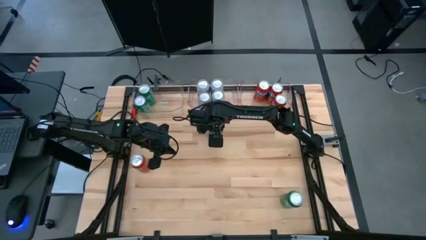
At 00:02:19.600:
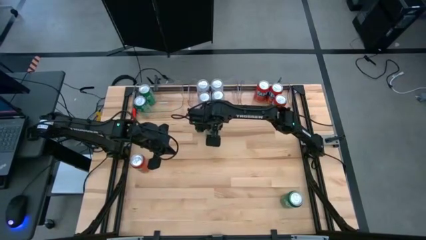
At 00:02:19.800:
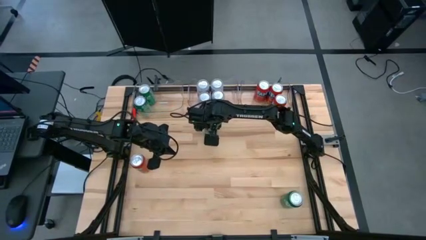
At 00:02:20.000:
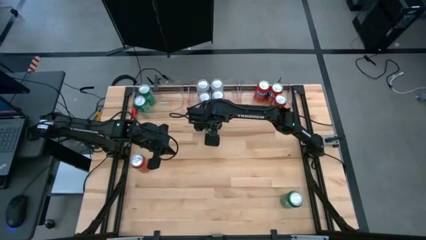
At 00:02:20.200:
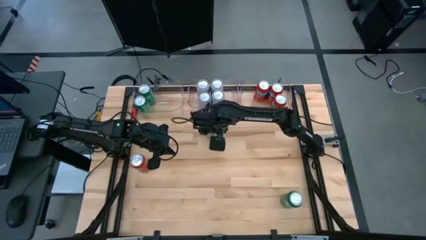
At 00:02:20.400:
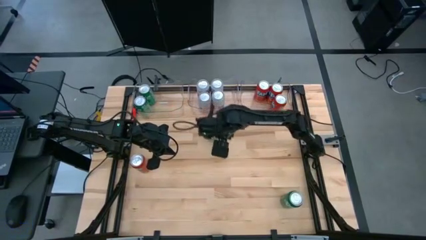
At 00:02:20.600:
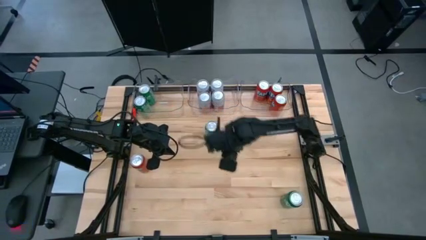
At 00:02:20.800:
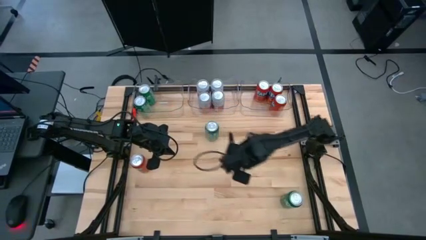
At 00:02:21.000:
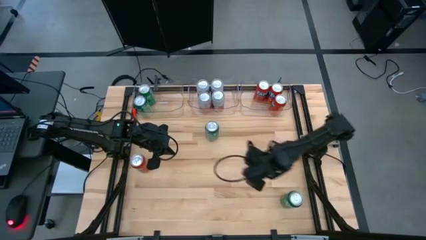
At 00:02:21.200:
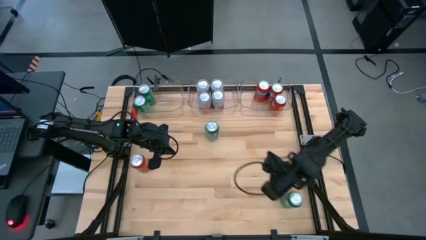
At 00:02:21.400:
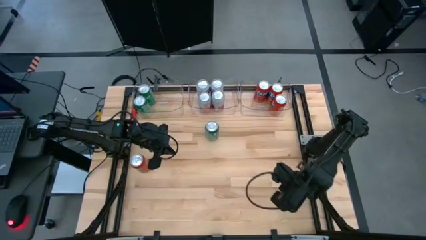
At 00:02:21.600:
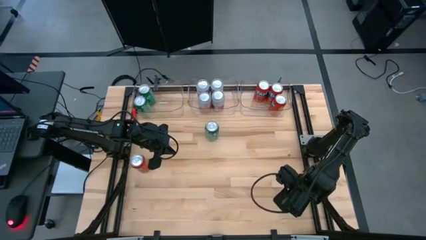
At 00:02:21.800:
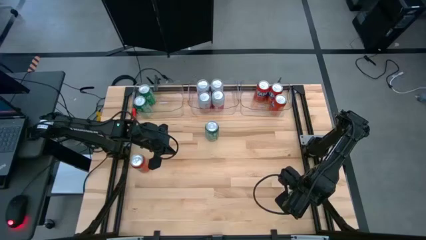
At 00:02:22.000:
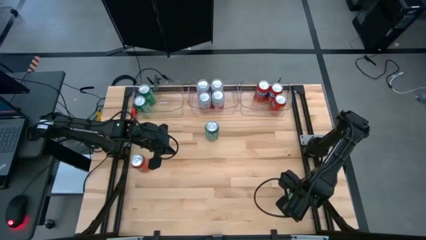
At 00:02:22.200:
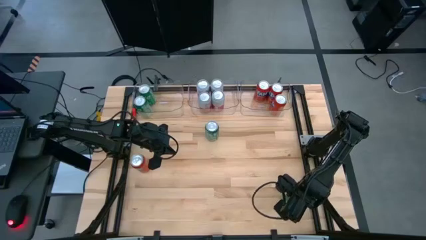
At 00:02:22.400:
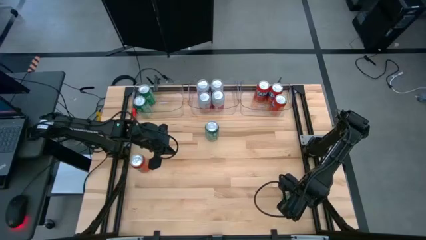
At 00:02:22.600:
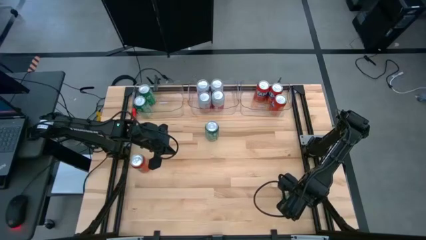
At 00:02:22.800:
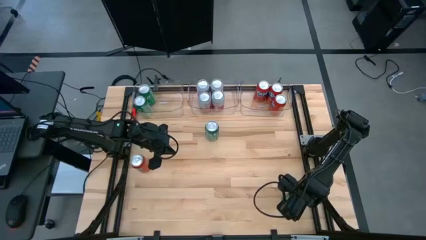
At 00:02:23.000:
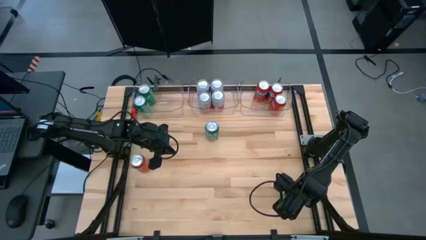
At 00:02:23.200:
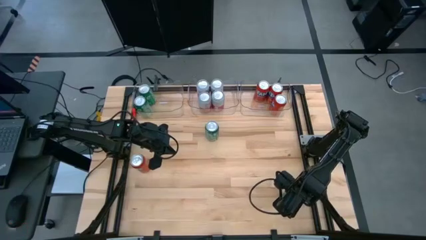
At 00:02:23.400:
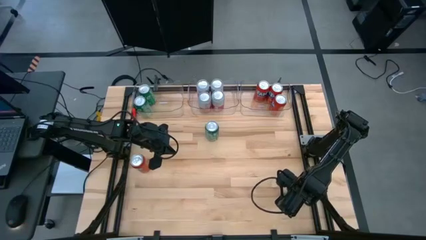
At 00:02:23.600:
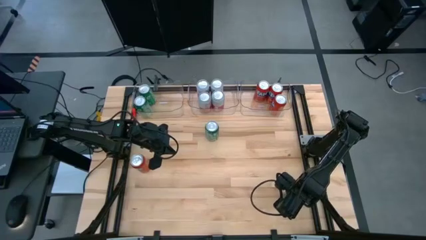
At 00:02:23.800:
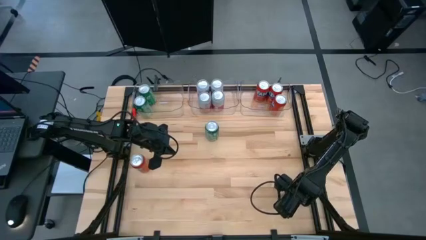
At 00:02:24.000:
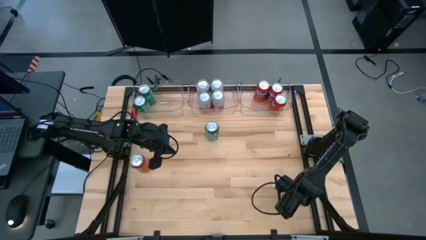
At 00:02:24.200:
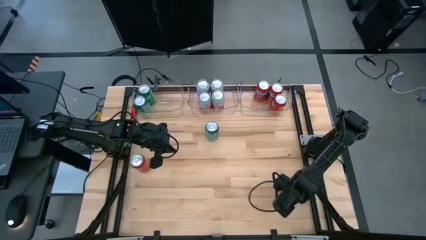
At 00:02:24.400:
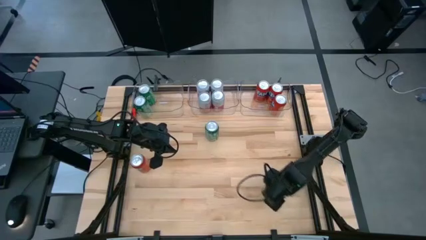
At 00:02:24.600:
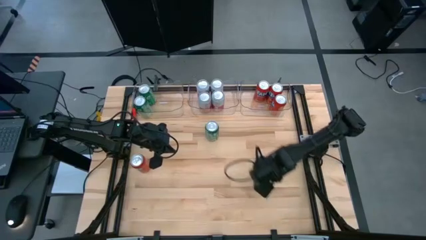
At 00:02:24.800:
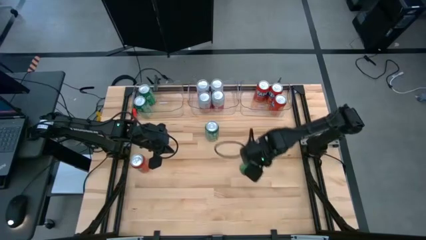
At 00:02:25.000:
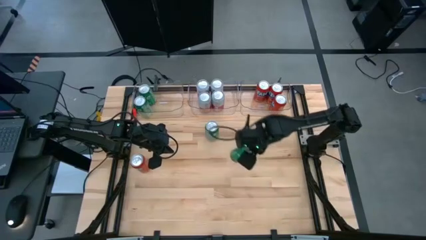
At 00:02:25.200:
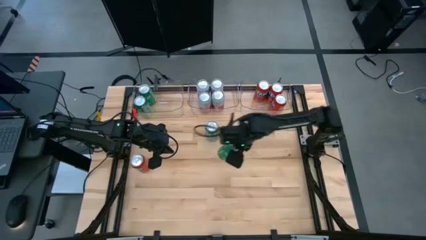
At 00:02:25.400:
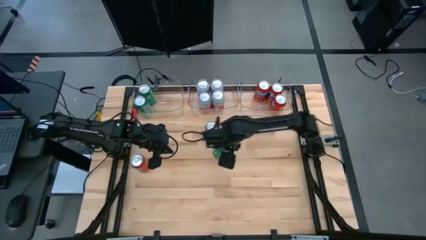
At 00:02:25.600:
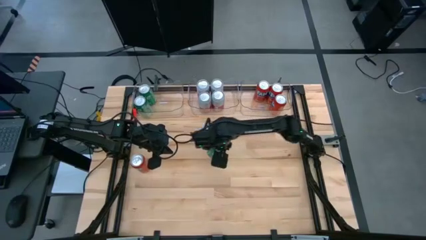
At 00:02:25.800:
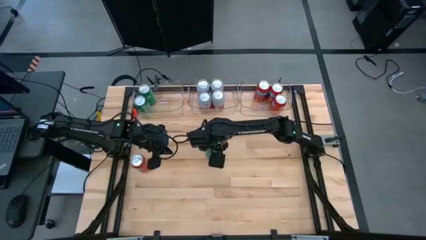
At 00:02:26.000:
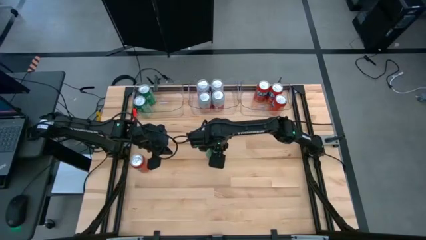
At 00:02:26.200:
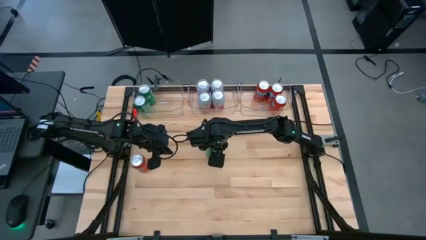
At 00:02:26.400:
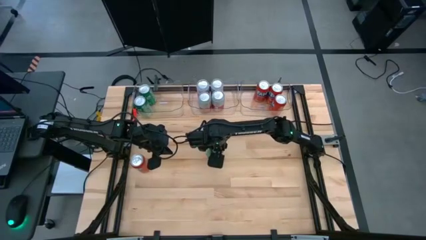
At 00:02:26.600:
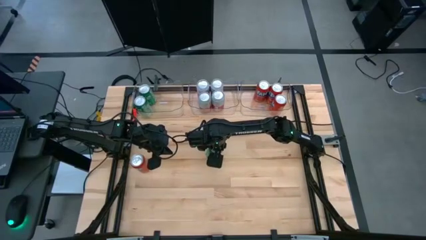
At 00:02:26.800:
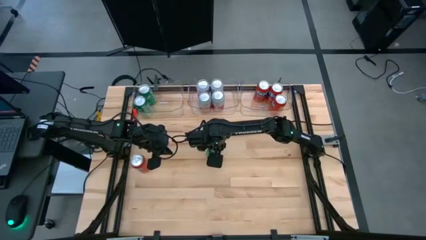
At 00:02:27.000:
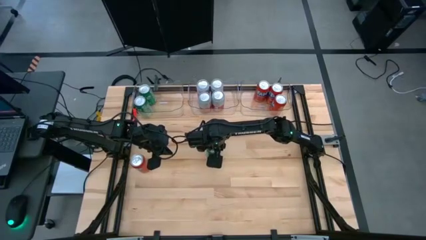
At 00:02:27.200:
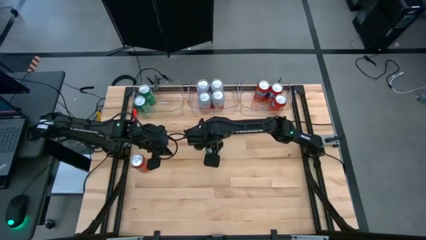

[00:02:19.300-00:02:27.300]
Task: Sort soda cans
Move the green soda can to the top center of the table

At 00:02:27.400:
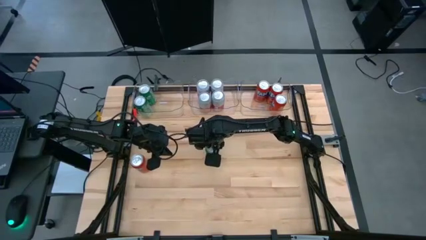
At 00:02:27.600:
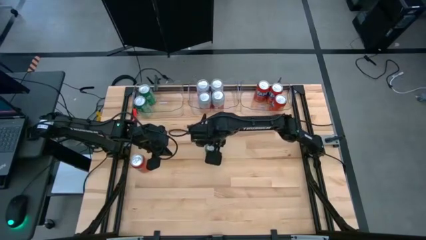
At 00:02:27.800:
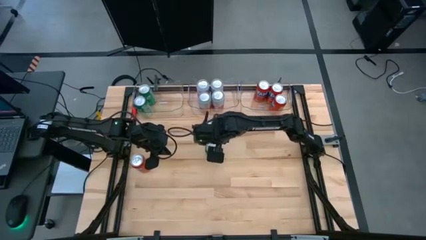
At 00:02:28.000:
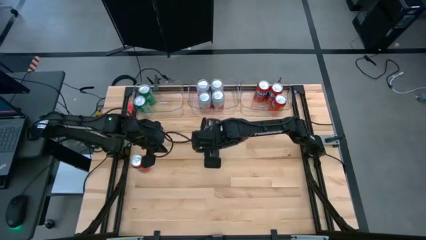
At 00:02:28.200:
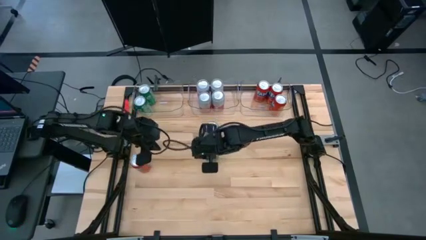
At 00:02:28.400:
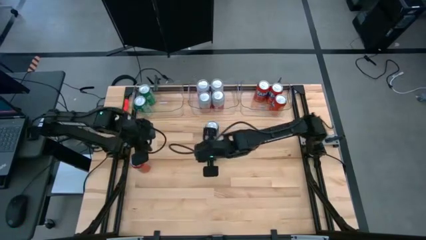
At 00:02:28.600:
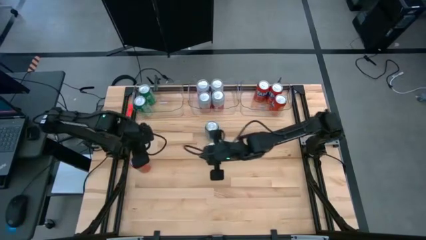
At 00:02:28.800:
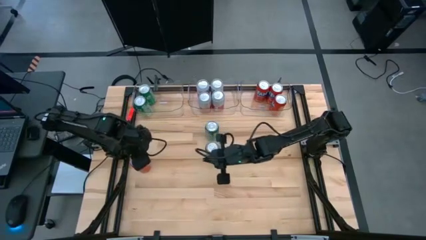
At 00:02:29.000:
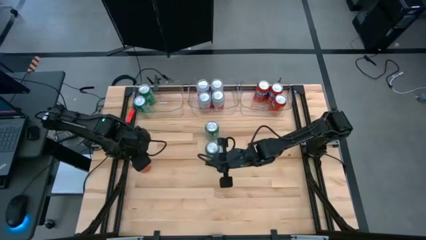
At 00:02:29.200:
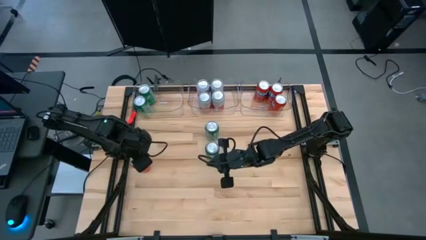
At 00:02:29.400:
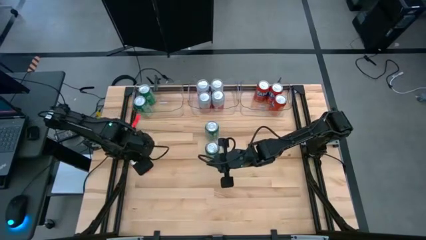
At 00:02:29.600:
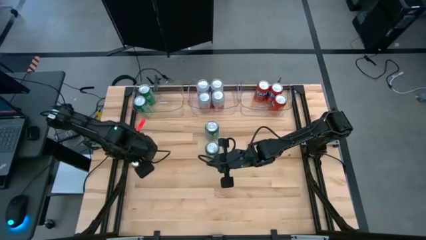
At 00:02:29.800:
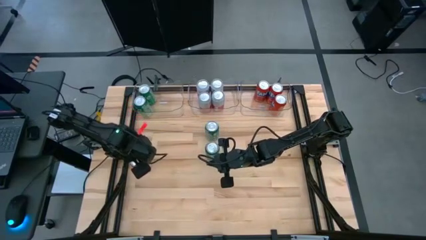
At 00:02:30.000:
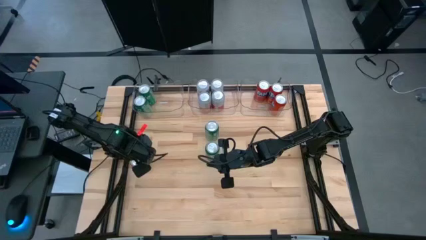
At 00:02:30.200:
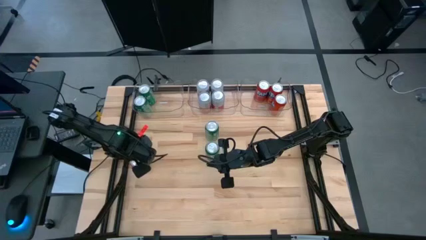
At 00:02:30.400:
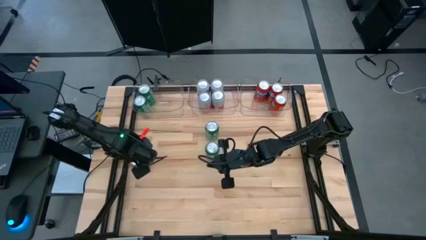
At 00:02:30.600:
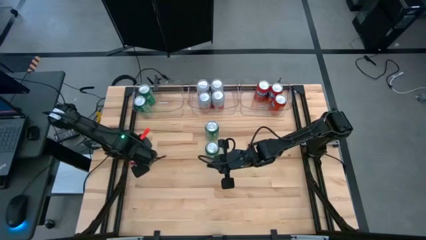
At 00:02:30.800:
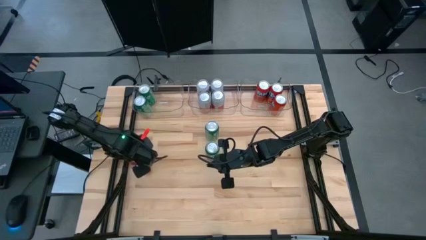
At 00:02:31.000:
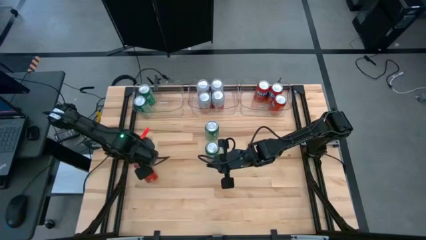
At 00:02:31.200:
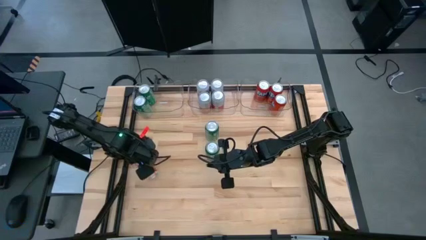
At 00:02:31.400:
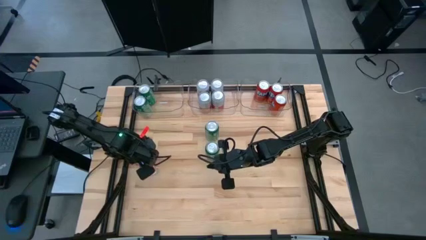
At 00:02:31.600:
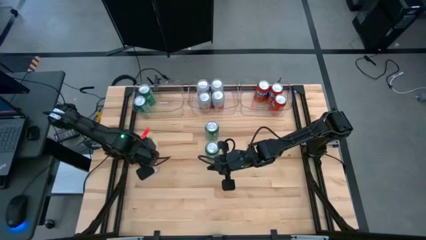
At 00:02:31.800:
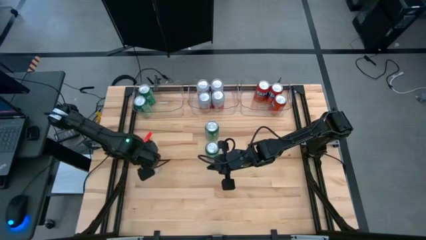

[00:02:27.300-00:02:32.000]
Put the red soda can into the top right transparent bin
